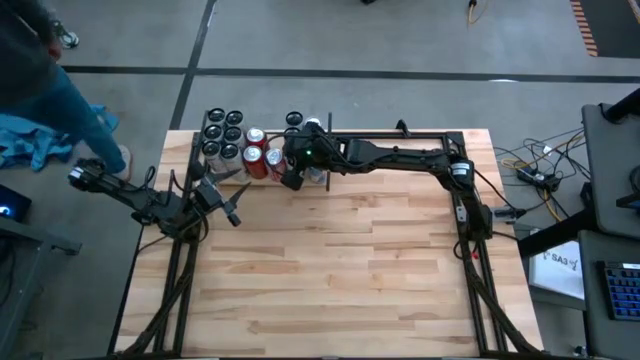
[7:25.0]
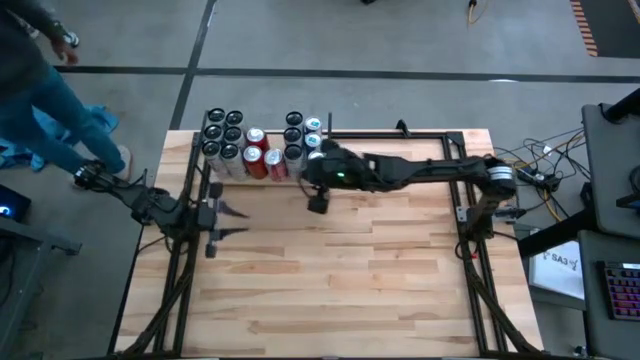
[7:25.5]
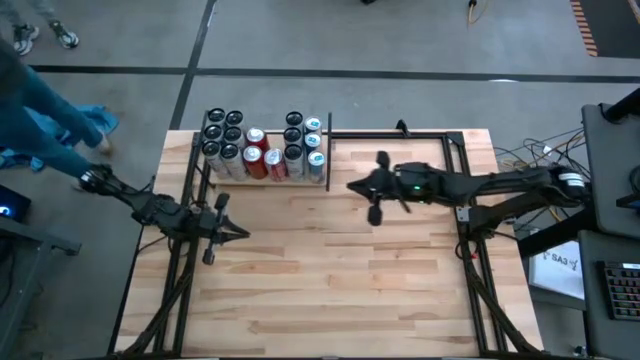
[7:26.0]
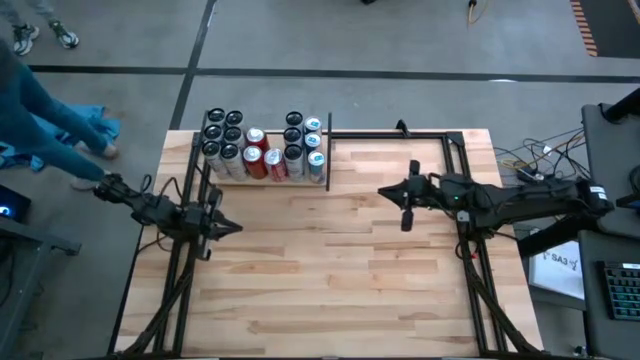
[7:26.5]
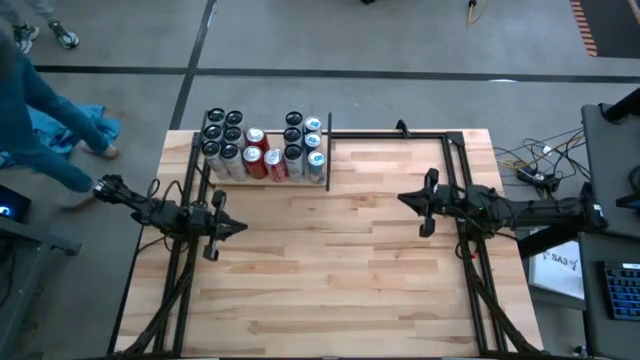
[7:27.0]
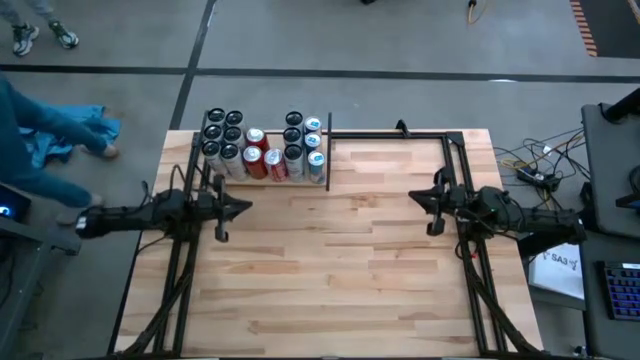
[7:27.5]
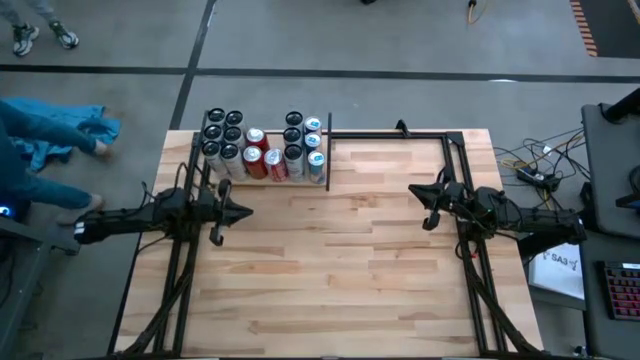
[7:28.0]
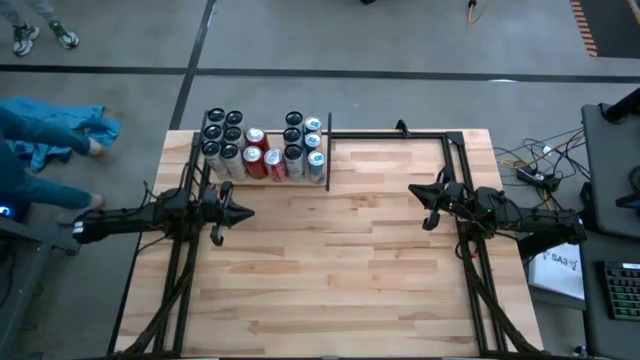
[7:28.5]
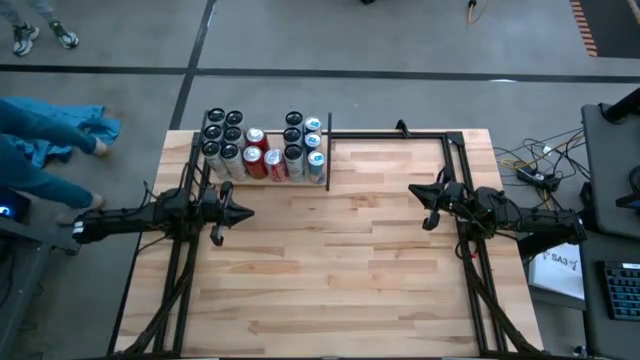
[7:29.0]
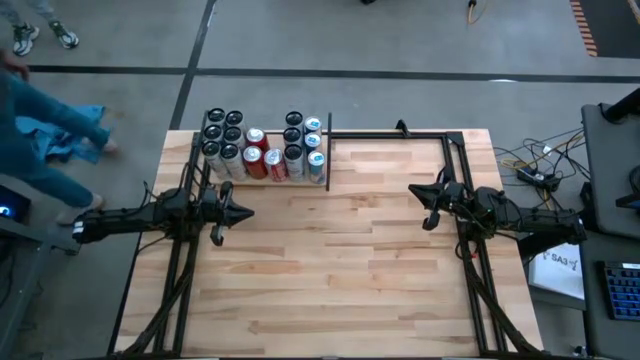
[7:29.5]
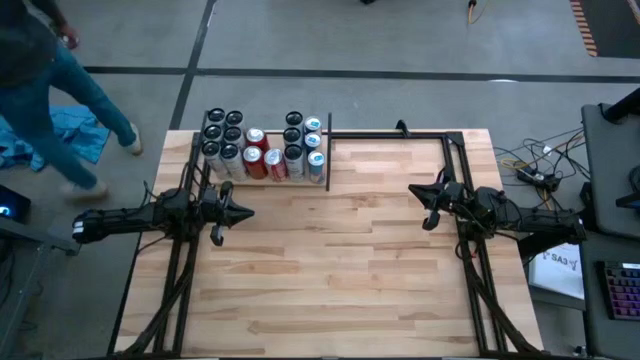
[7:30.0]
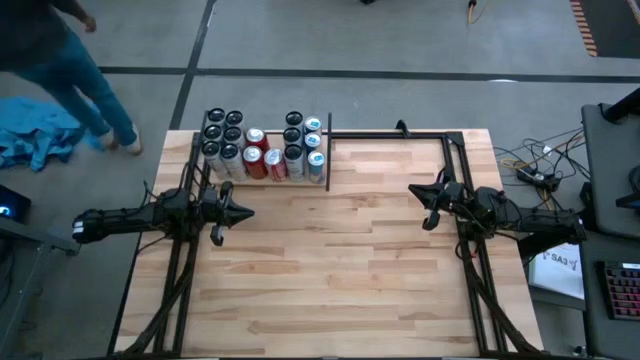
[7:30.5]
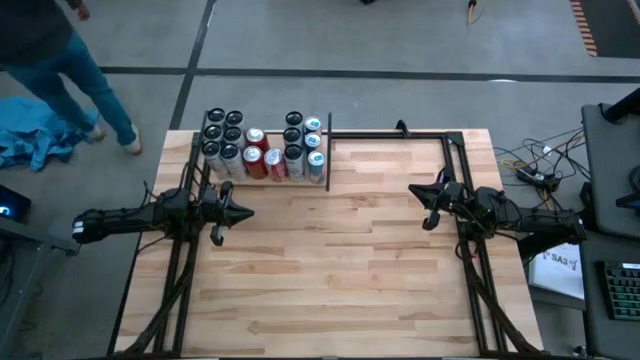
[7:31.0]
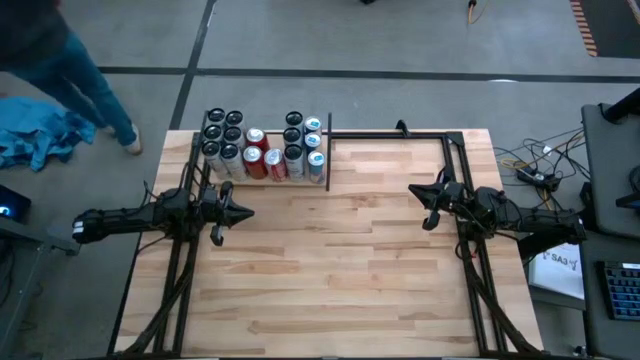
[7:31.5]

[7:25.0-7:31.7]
Task: Place canned beverage on shelf
Return to Home Position

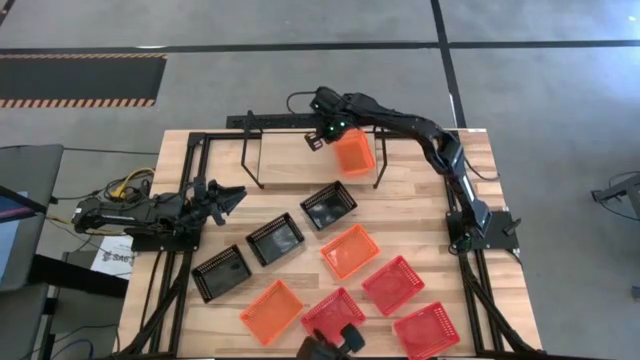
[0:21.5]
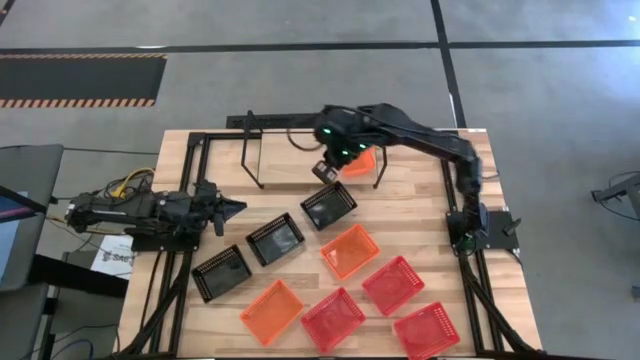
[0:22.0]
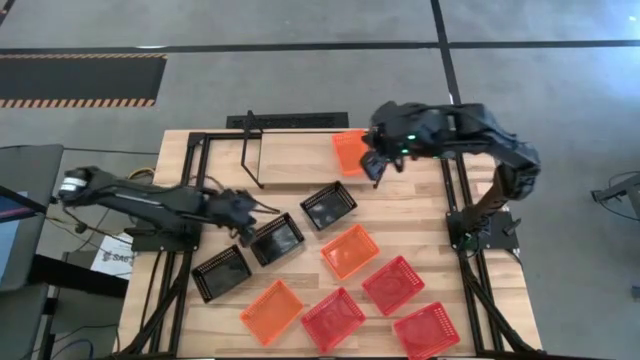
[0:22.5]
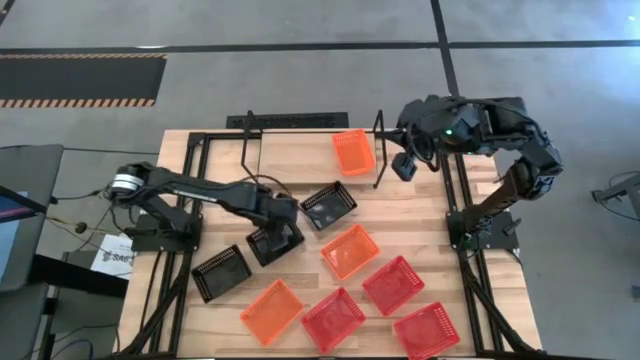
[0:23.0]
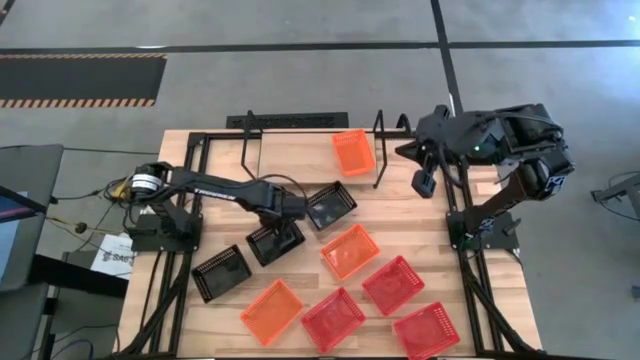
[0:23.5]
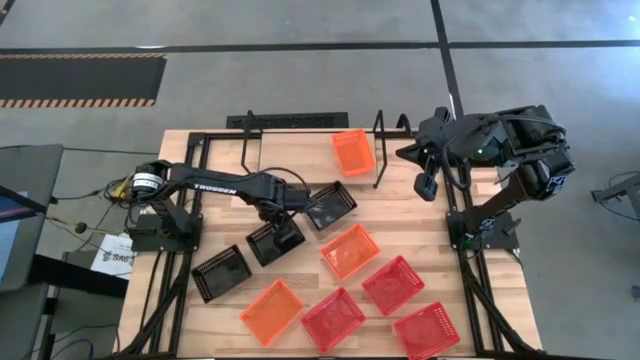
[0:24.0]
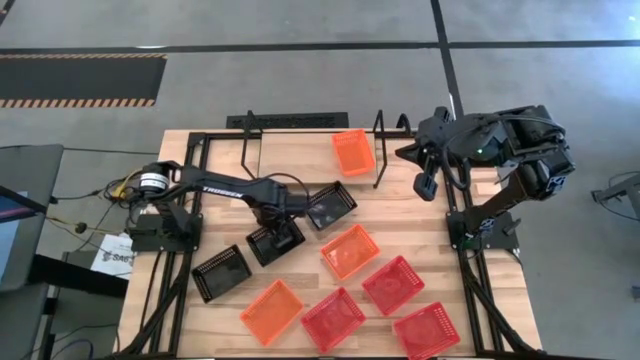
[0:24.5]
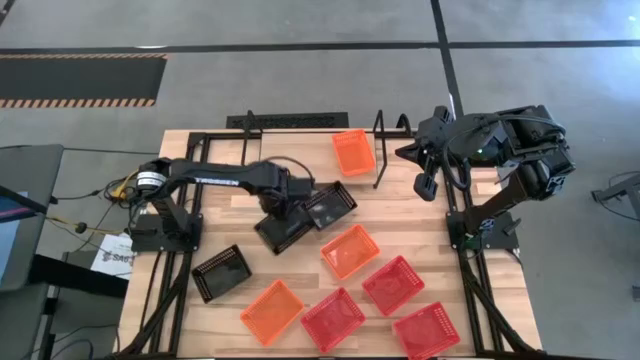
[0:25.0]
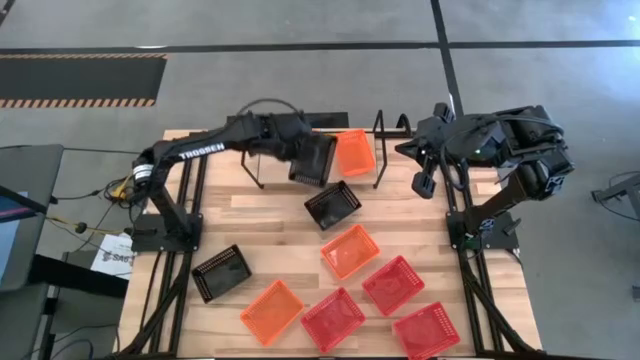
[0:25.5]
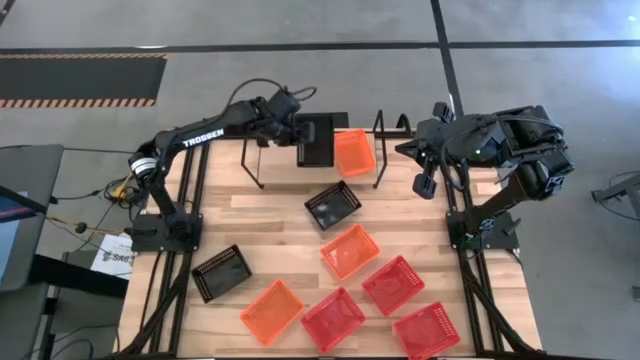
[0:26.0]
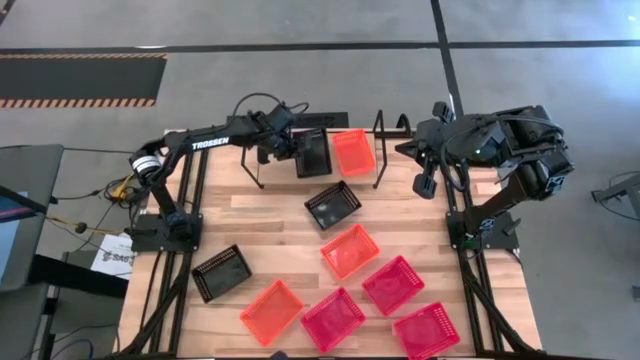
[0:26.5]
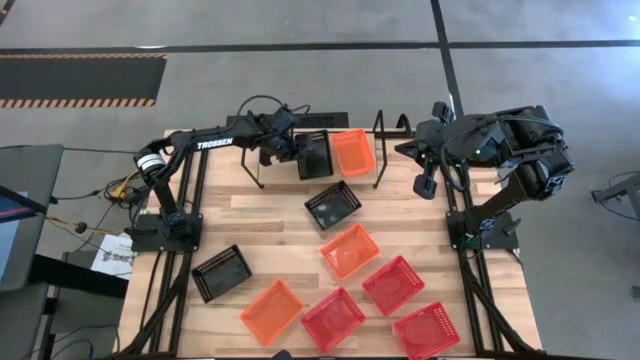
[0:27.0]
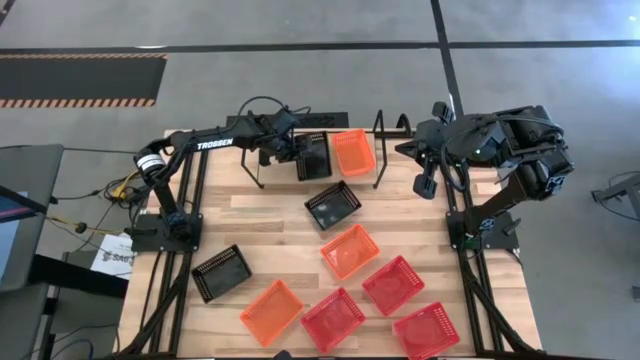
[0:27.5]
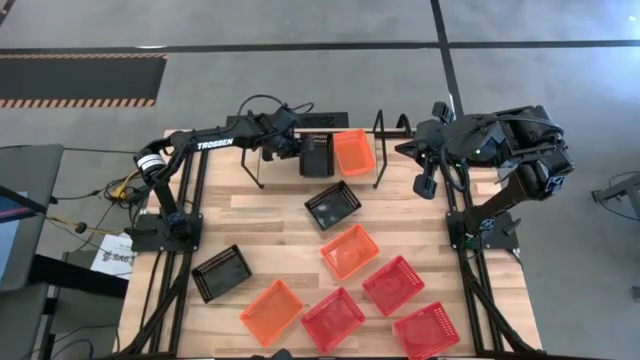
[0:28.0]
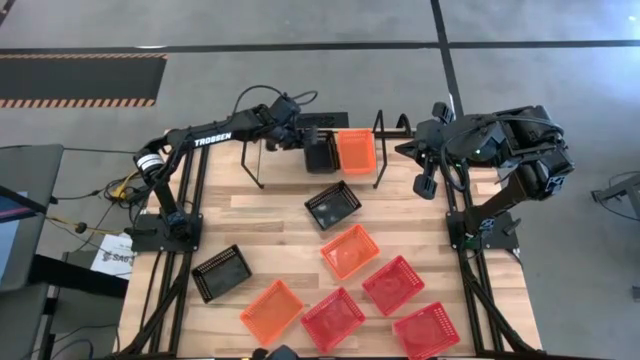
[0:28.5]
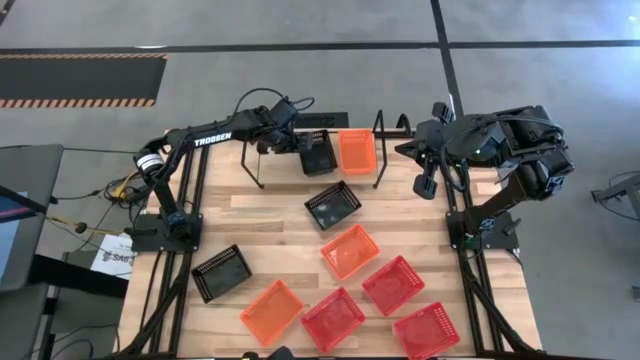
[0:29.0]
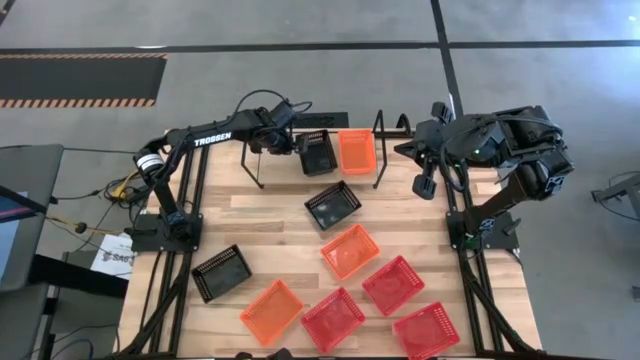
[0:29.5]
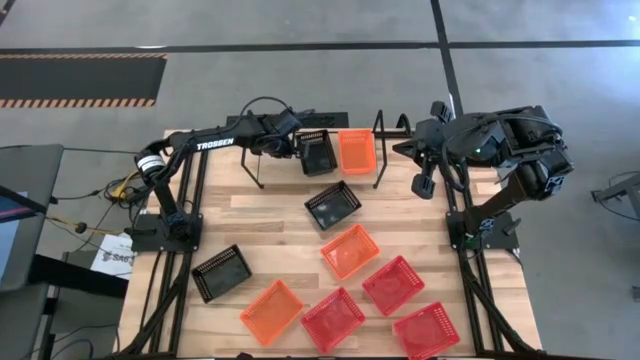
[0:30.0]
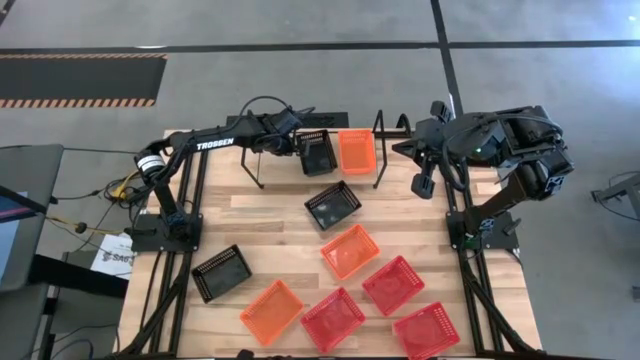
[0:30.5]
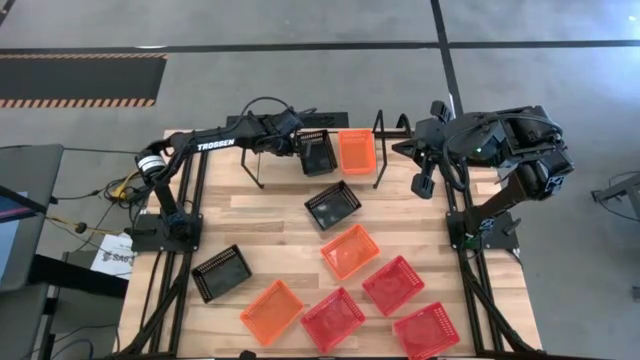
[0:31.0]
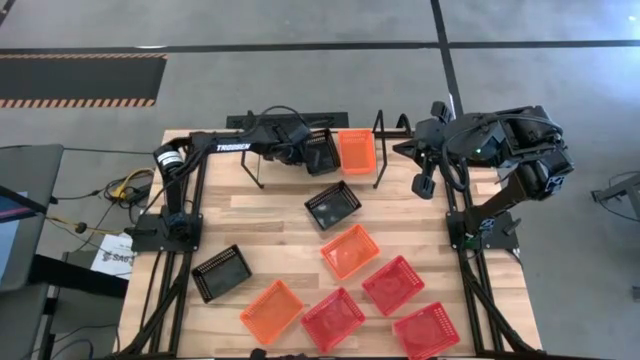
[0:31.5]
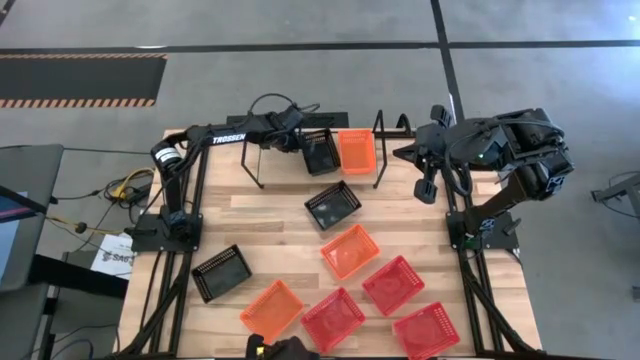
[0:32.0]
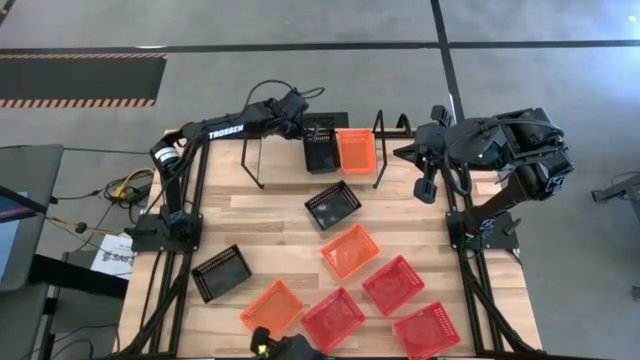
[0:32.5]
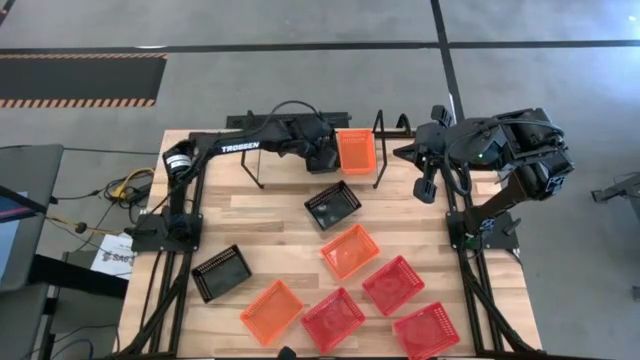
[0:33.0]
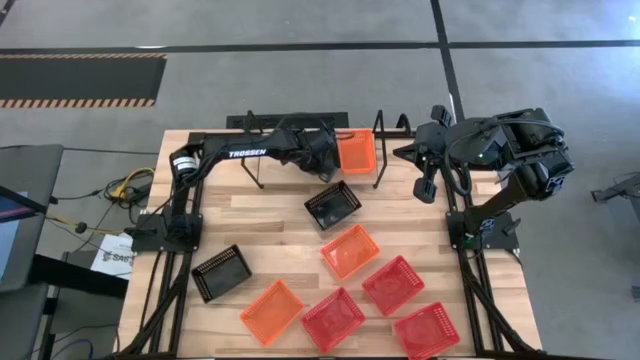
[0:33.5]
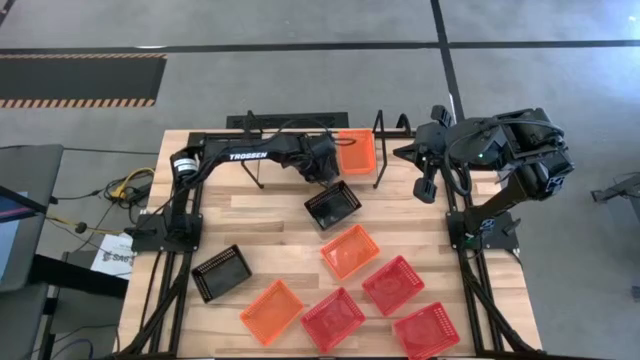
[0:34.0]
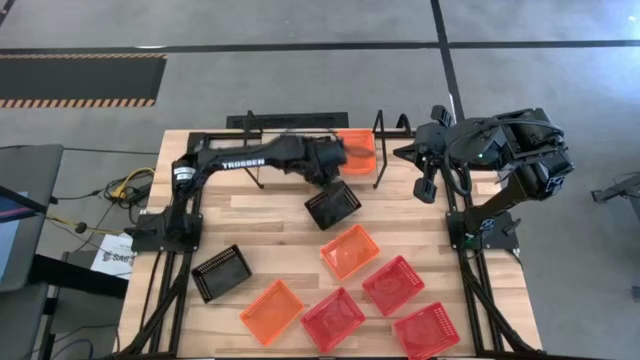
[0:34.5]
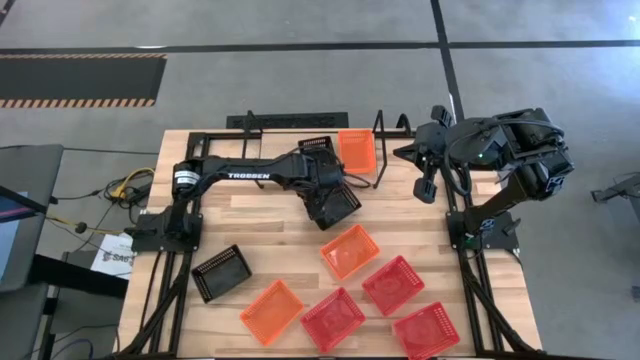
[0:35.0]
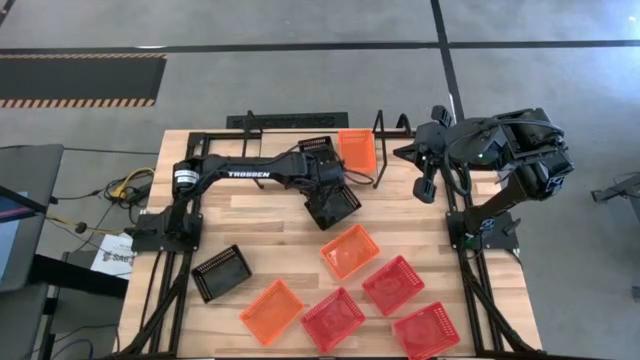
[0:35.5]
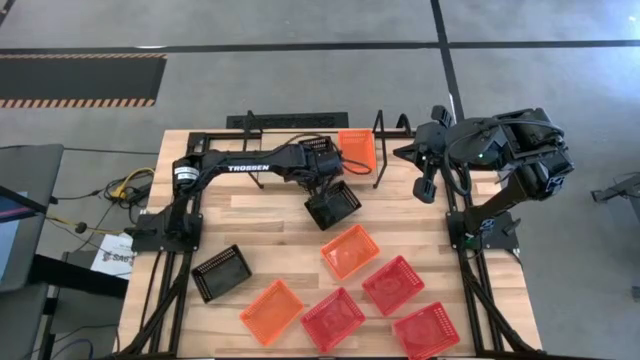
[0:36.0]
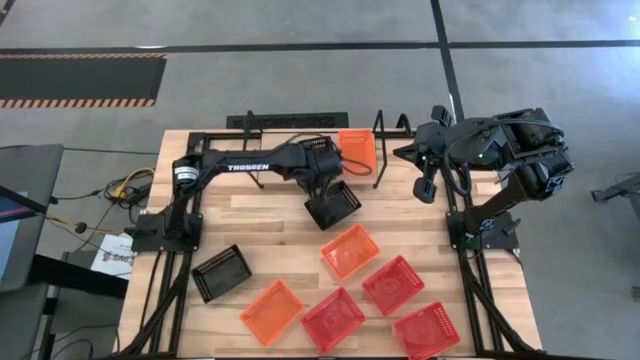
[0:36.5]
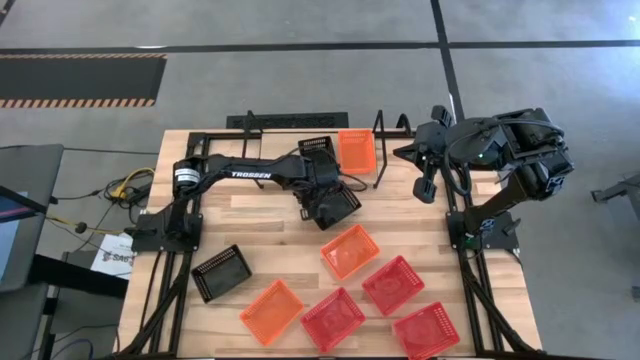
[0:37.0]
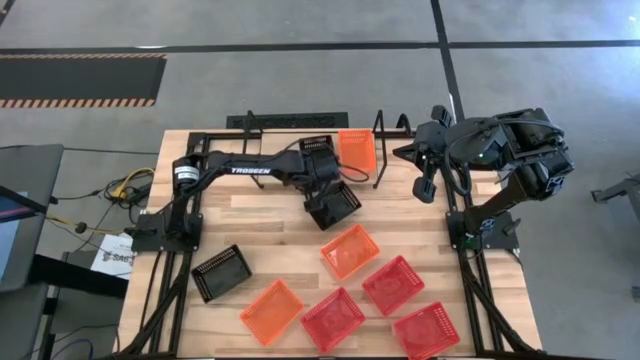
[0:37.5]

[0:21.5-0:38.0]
Task: Stack baskets on shelf by color
Put the middle black bin on the shelf
